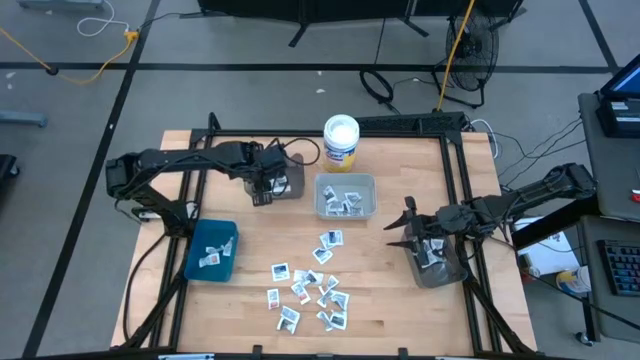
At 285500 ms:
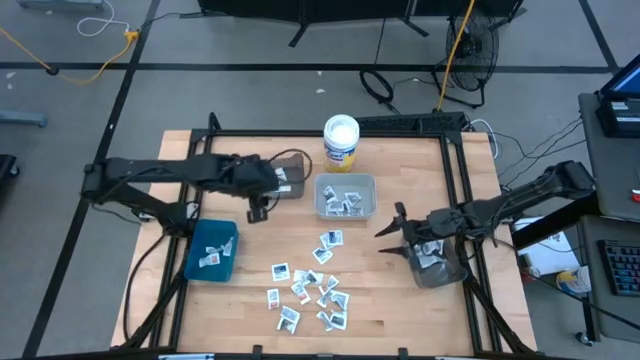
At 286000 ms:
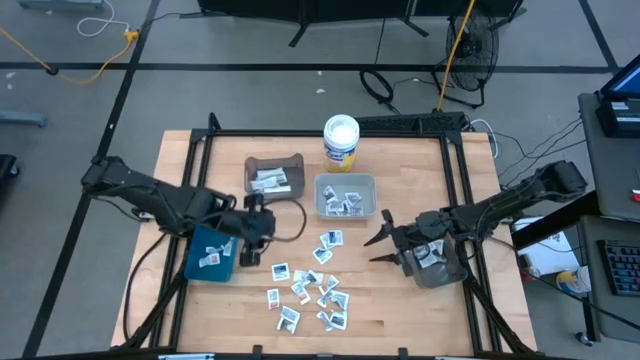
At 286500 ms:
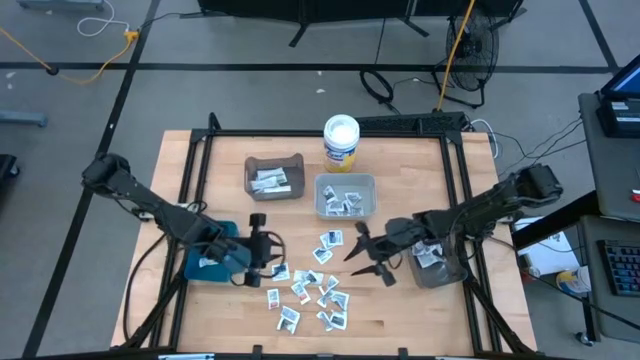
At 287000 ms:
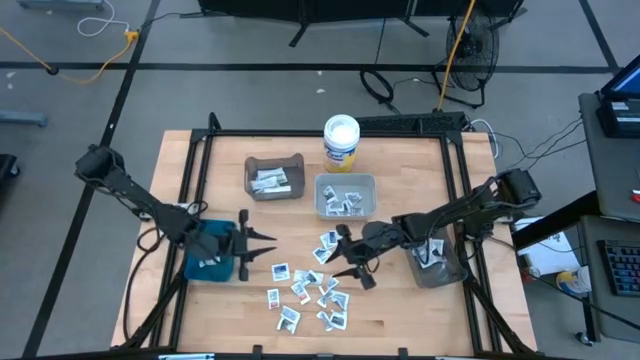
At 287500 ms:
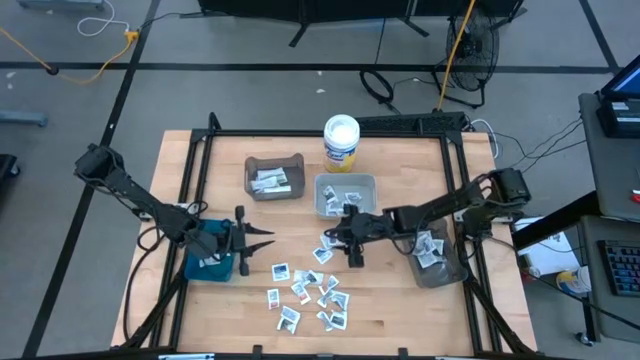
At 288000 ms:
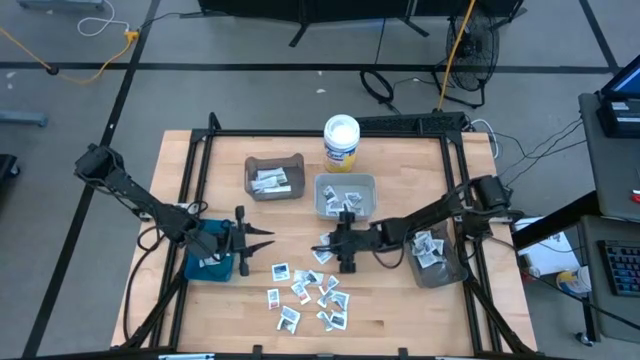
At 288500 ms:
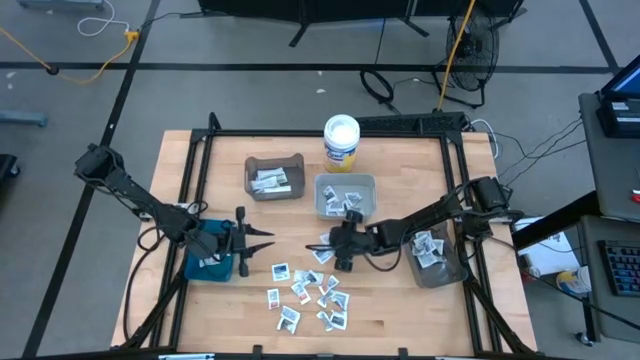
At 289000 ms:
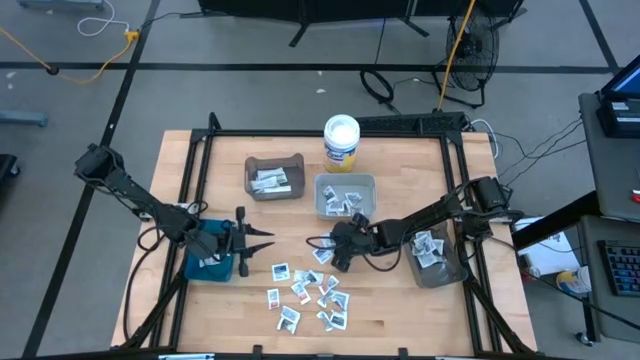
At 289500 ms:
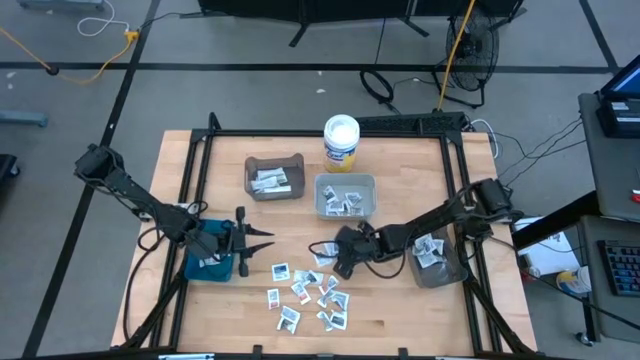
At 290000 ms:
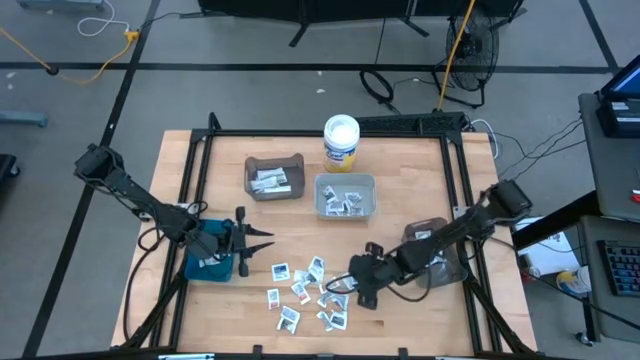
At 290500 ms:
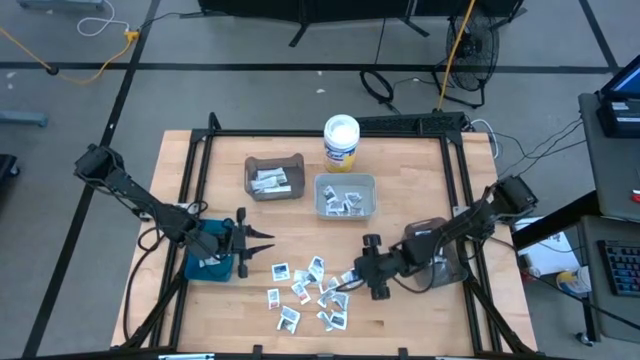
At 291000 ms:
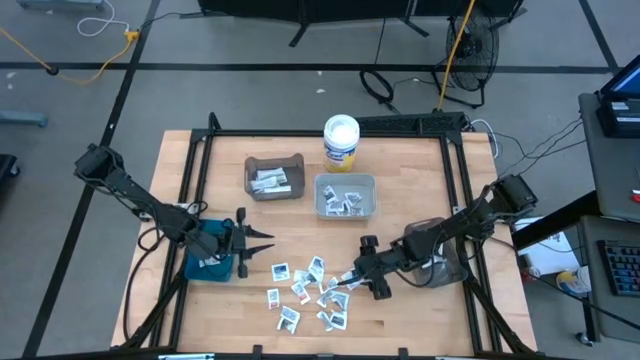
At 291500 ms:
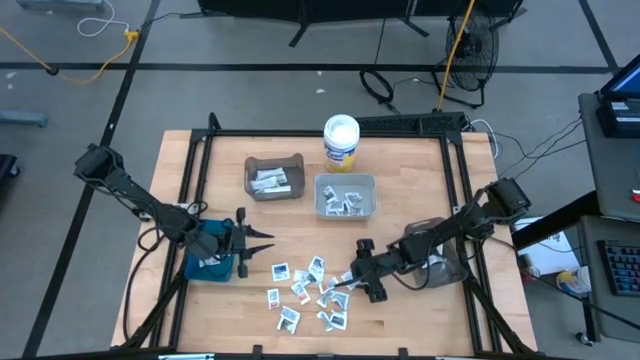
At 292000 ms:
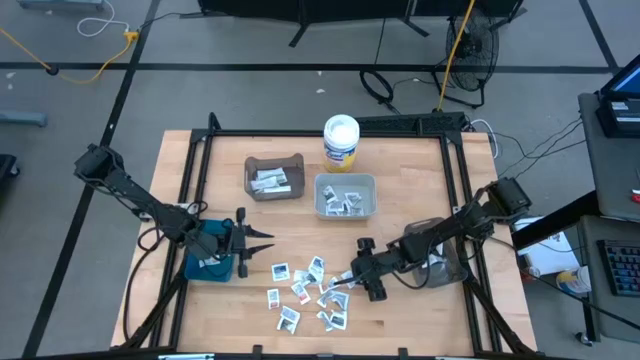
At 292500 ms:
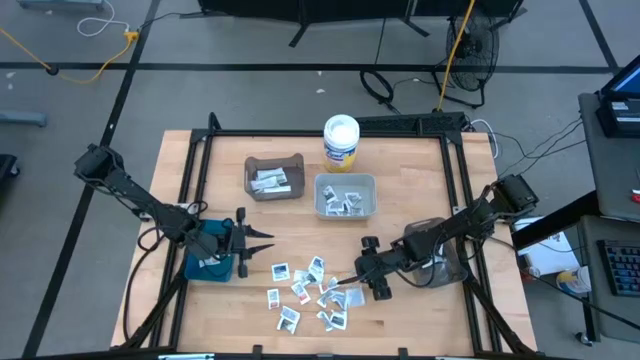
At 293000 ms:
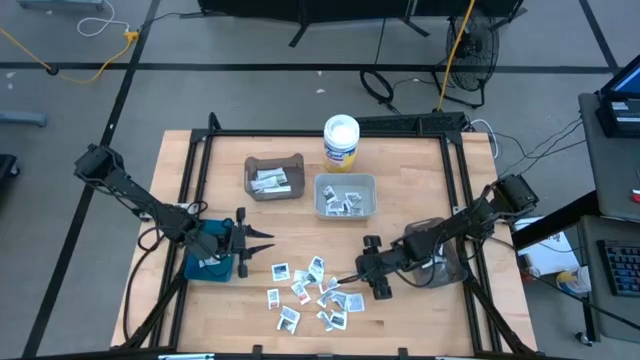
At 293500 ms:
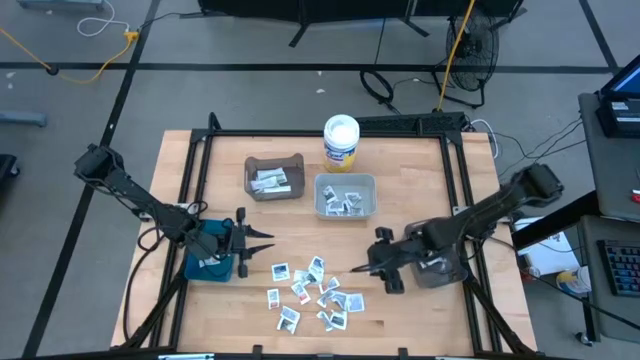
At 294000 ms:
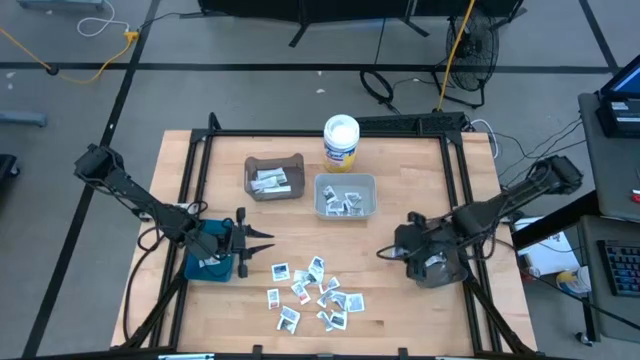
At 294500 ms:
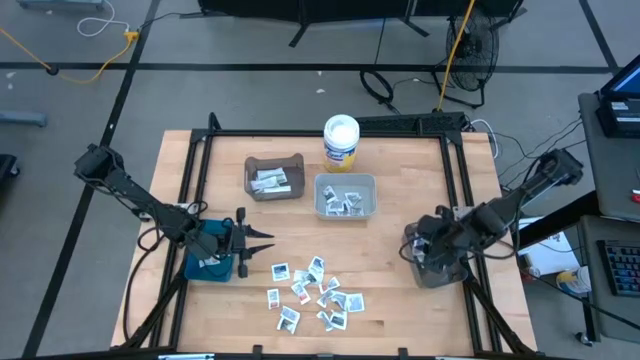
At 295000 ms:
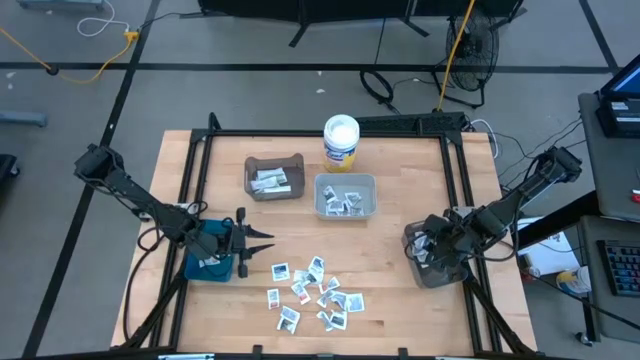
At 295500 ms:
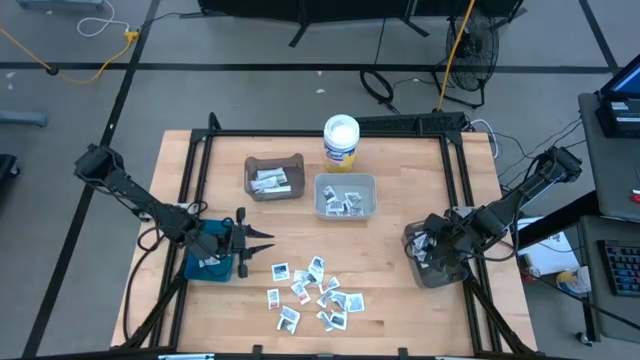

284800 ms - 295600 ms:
Task: Pick & Place First Aid Supplies
Put the blue alcohol pad into the bottom black bin

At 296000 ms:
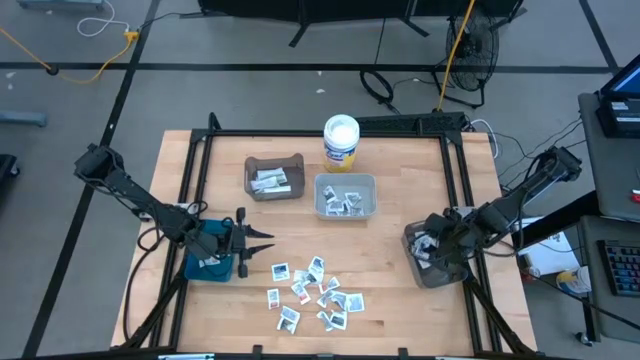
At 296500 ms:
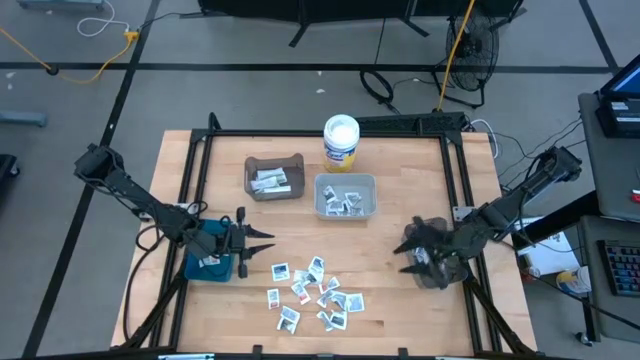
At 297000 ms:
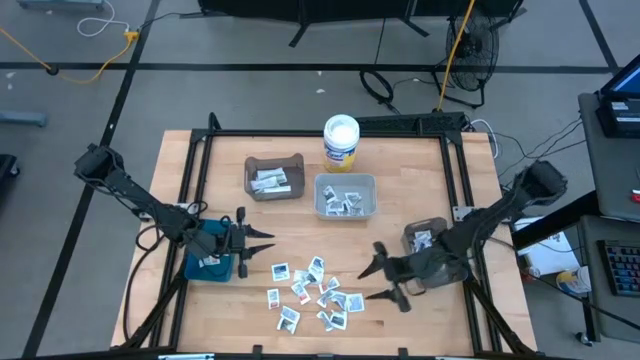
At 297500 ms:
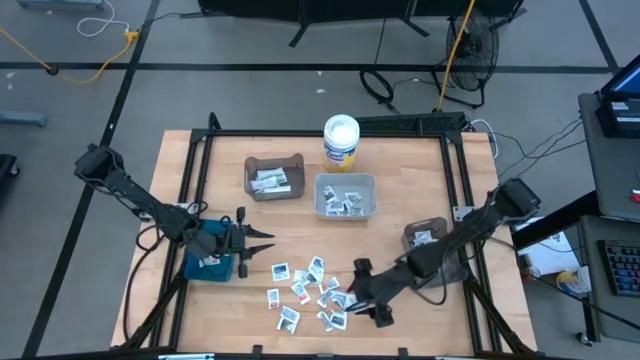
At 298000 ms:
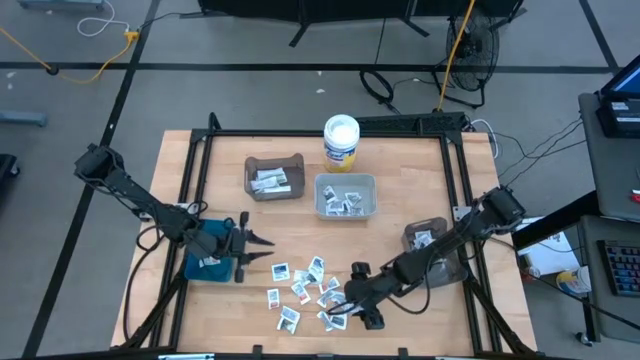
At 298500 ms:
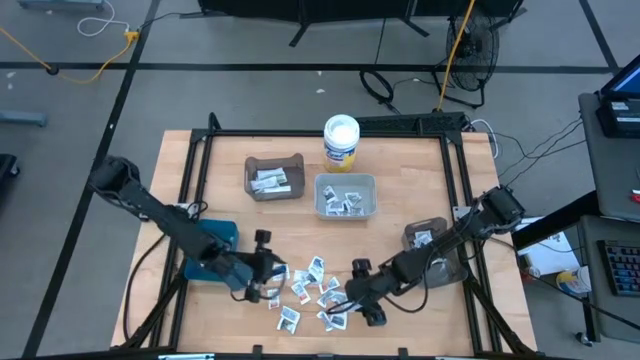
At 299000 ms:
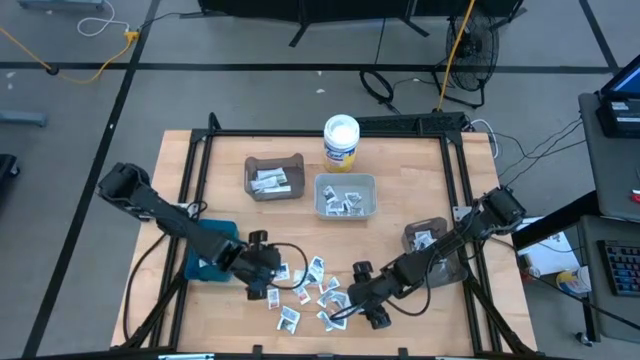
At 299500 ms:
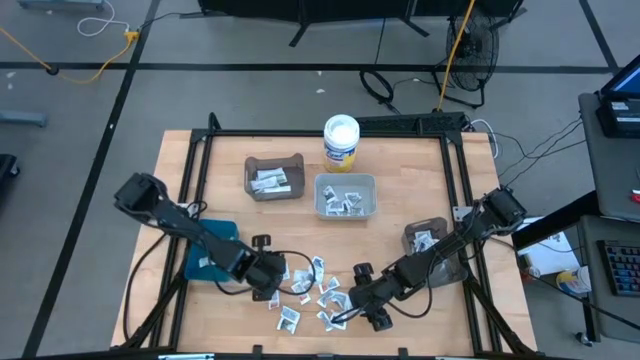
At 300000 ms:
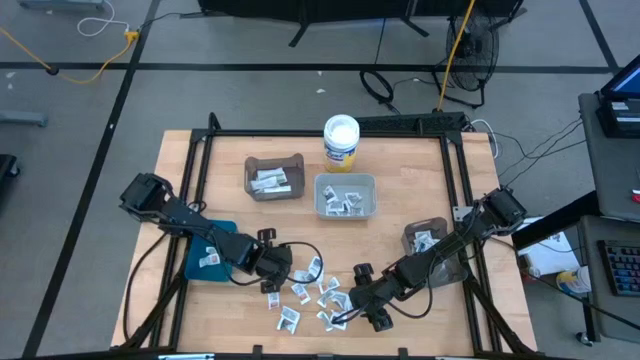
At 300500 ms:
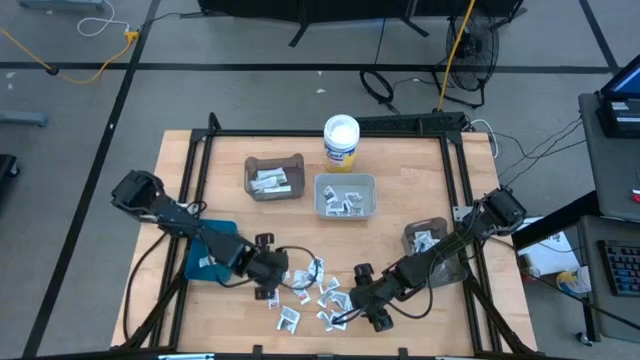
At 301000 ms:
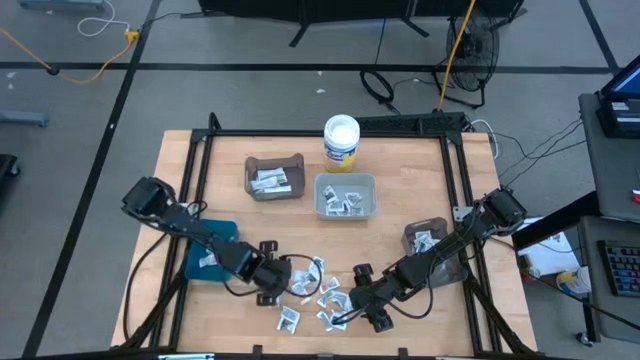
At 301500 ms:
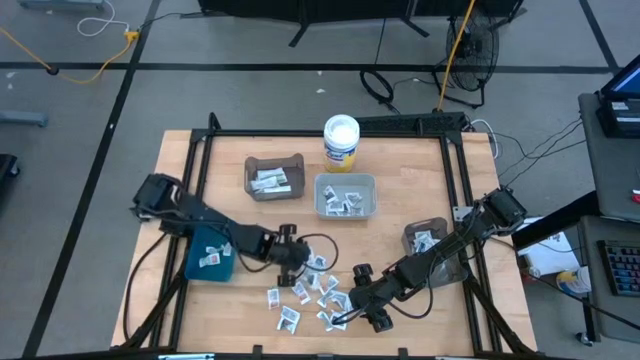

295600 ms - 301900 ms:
Move the blue alcohol pad to the center of the table

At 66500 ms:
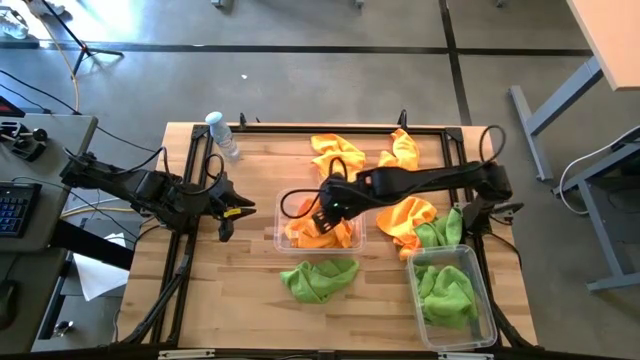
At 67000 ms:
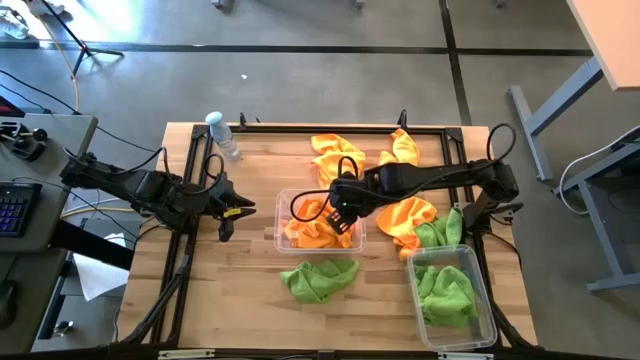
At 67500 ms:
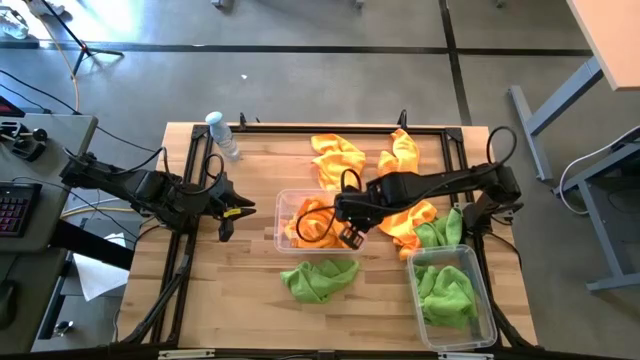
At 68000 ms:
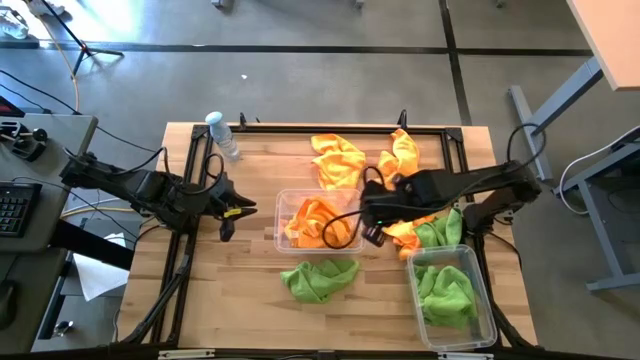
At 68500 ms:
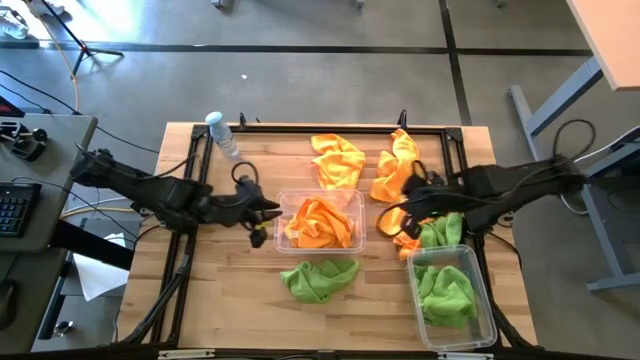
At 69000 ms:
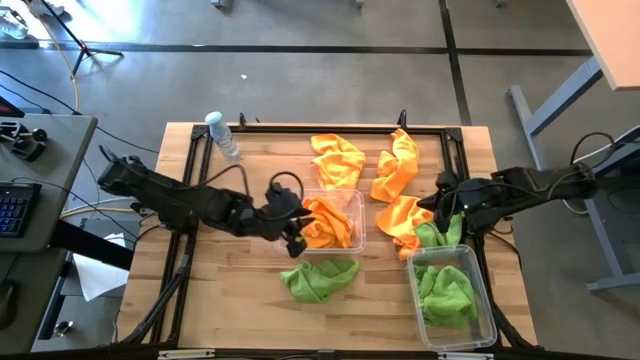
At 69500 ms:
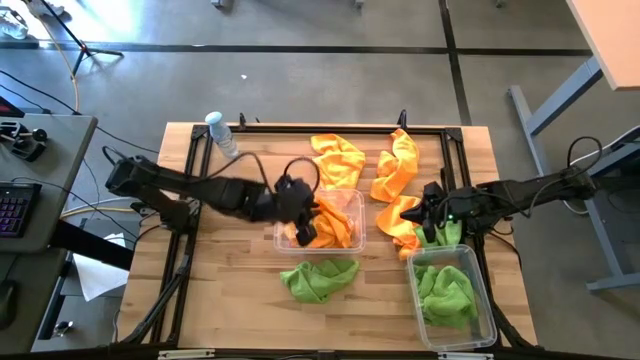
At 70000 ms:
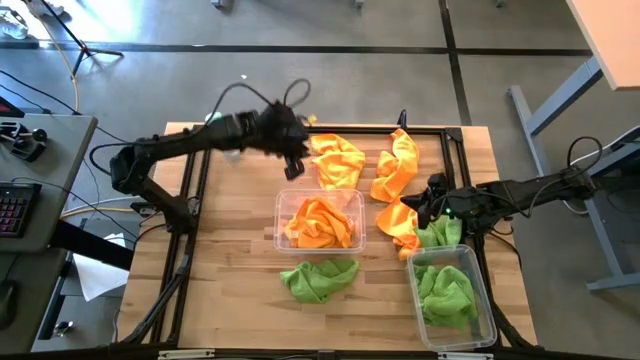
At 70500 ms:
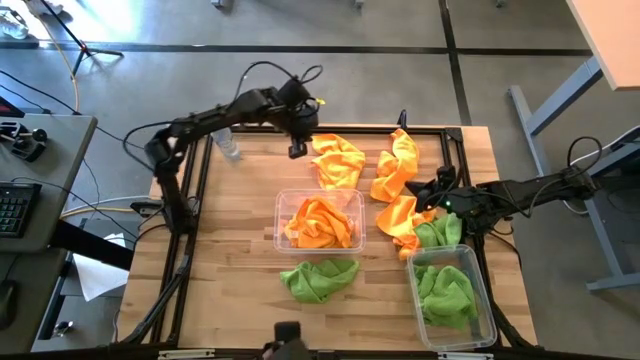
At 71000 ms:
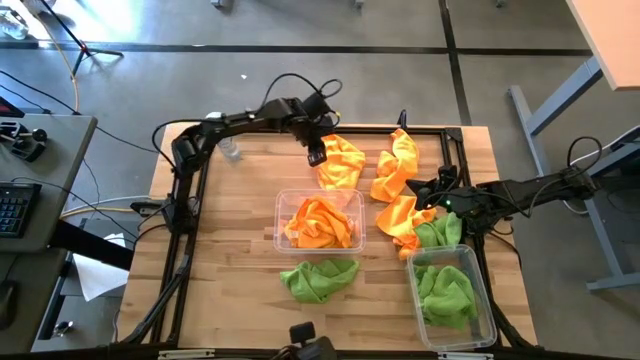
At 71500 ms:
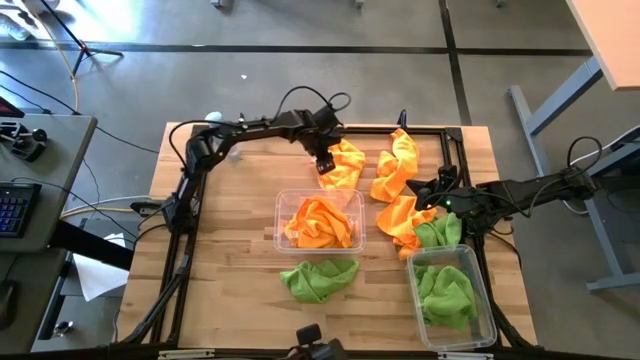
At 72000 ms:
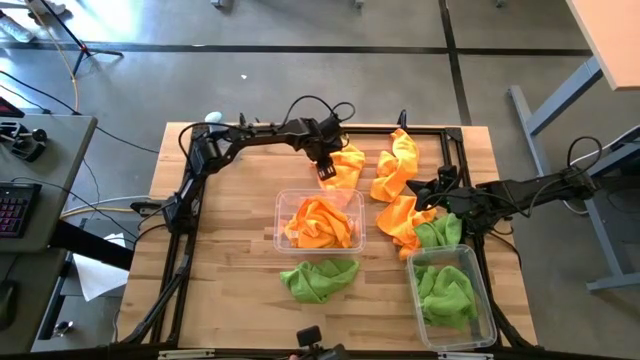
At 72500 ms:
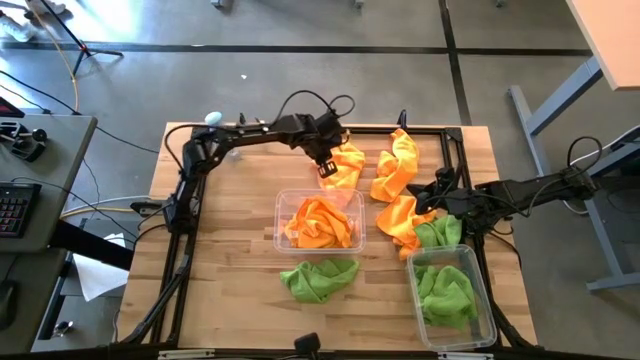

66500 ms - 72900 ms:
Task: Sort microfiber towel by color & place in baskets
Put the orange towel into the top transparent bin
